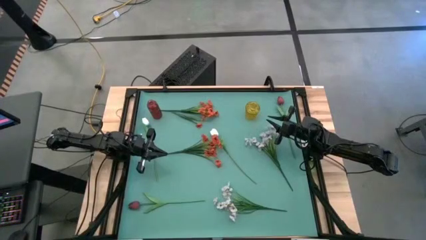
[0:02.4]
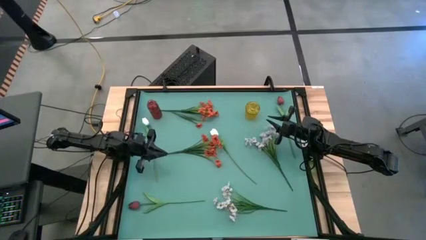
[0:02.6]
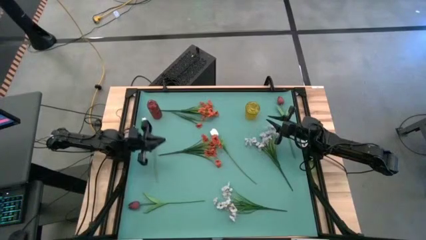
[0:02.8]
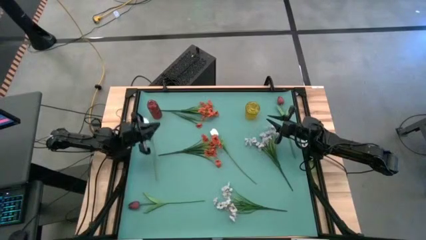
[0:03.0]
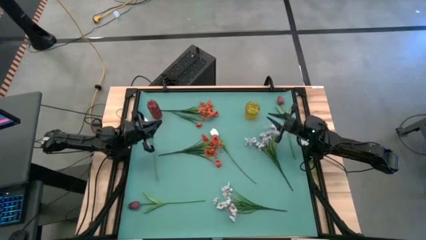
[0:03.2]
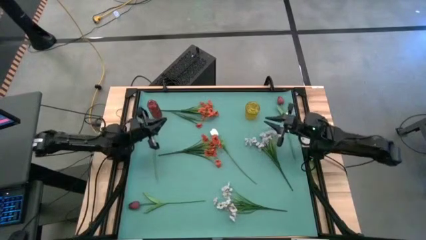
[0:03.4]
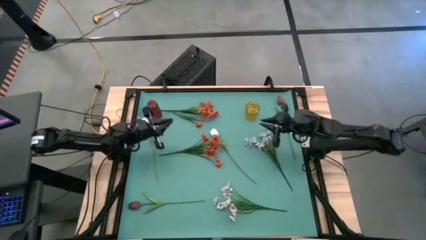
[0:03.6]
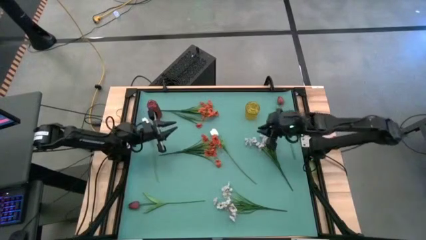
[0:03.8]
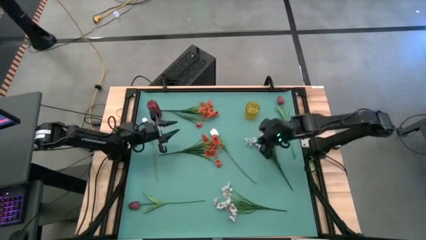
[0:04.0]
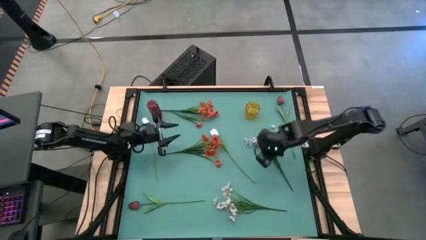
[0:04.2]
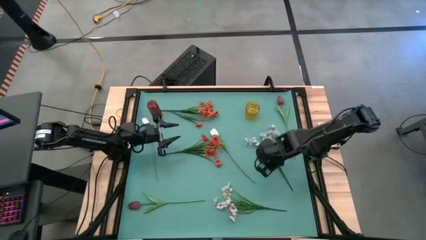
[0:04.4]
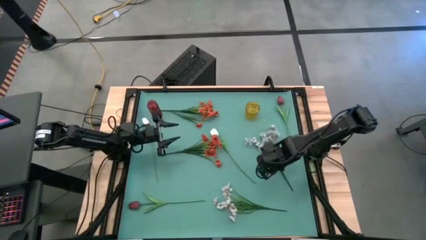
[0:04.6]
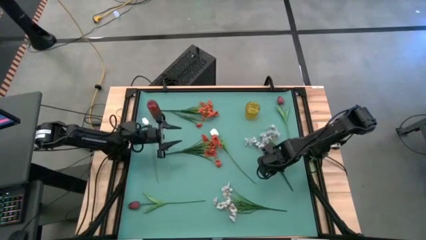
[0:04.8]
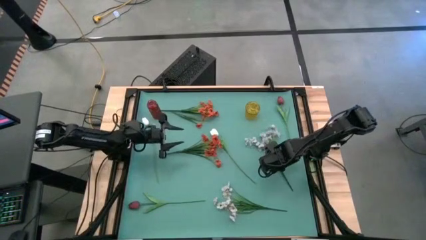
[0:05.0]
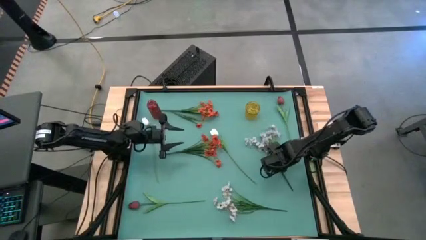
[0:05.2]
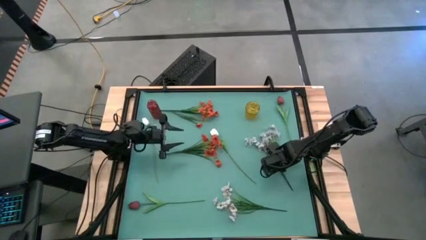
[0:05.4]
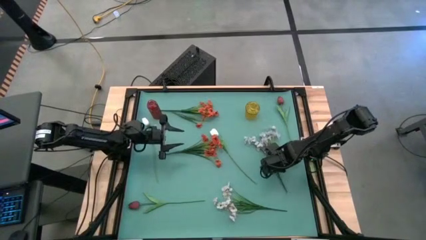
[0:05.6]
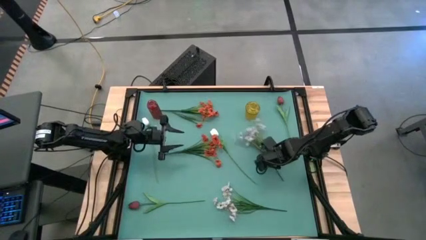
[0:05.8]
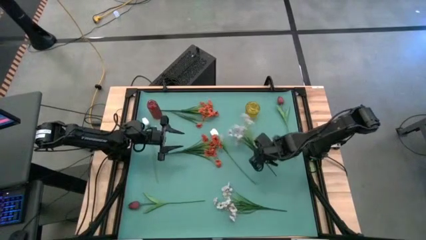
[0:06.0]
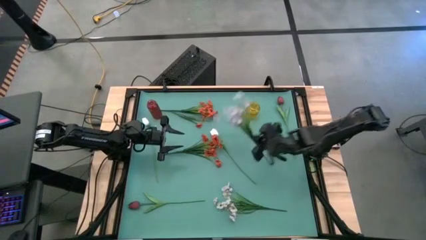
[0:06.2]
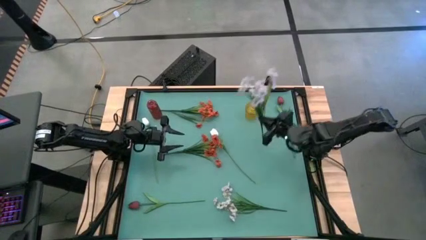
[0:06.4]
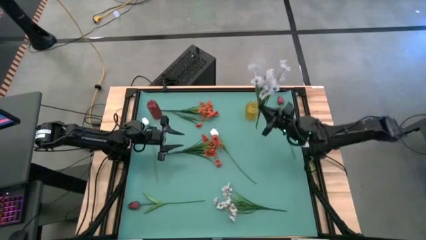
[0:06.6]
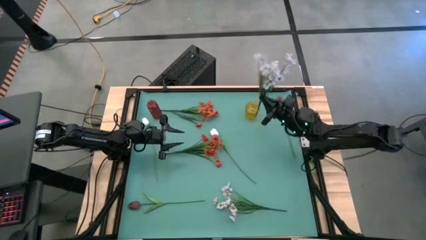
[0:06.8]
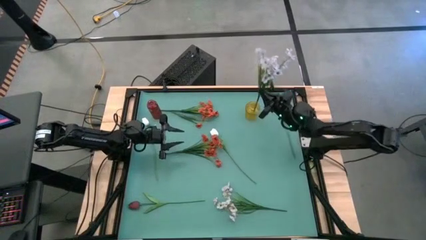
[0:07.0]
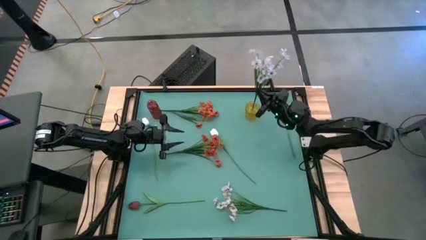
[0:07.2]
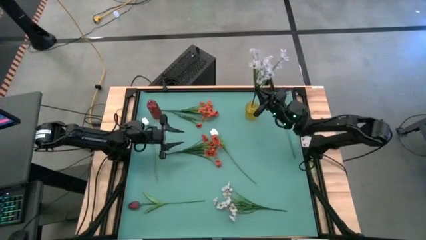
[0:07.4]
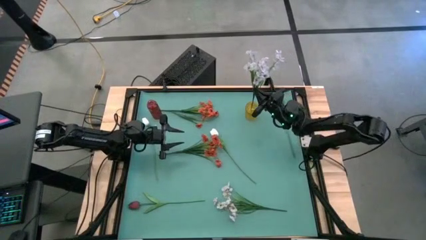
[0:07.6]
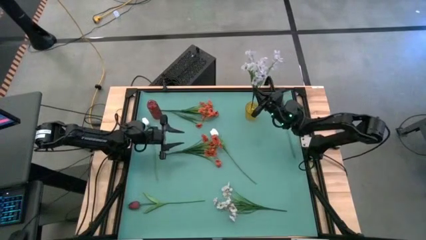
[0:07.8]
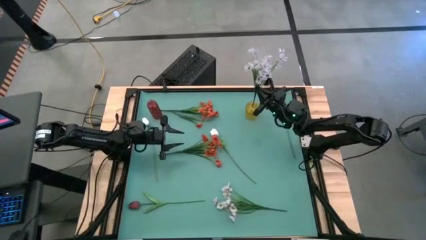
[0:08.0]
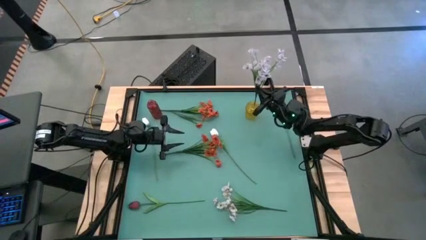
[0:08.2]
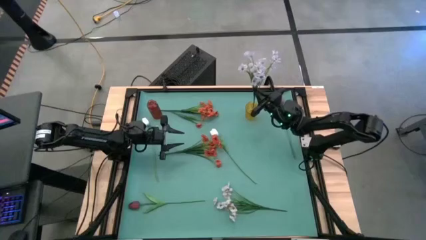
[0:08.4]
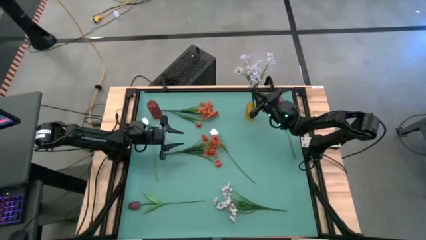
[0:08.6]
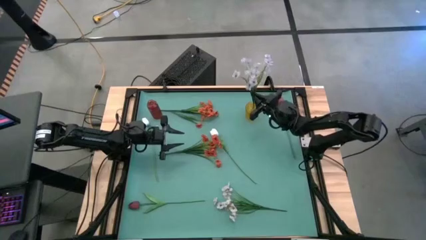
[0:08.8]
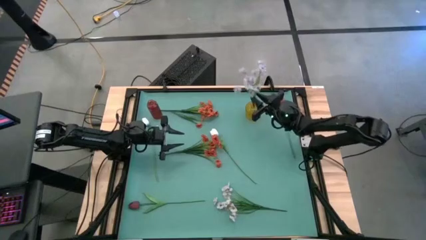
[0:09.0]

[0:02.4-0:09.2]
Task: Sort flowers into vase by color
Put the top white flowers into the yellow vase

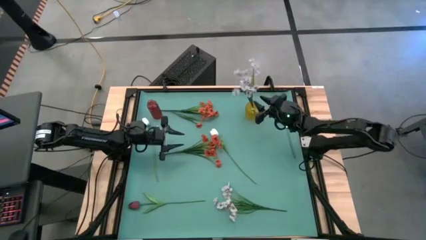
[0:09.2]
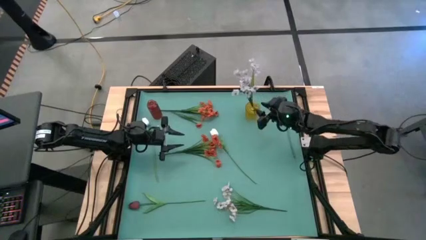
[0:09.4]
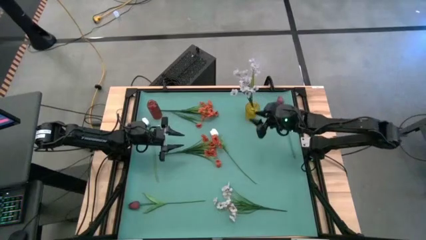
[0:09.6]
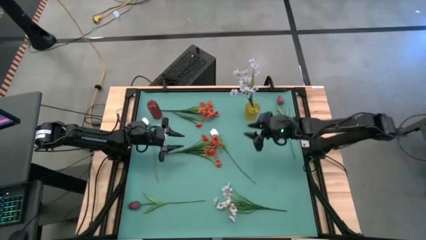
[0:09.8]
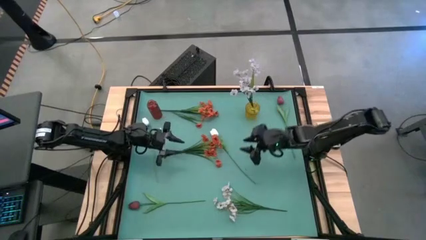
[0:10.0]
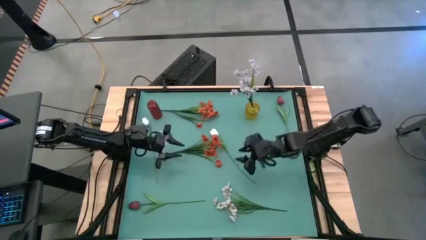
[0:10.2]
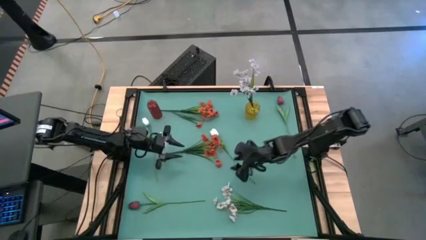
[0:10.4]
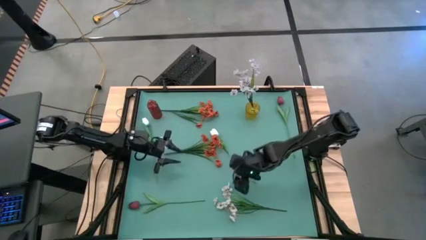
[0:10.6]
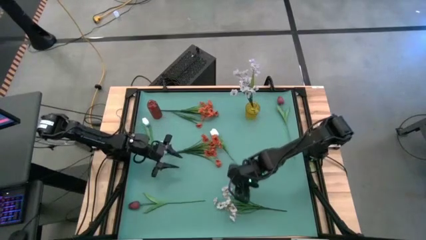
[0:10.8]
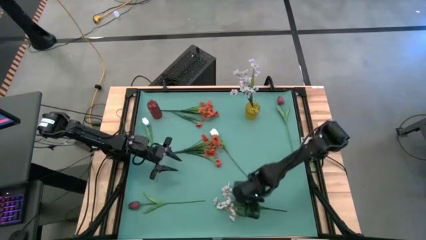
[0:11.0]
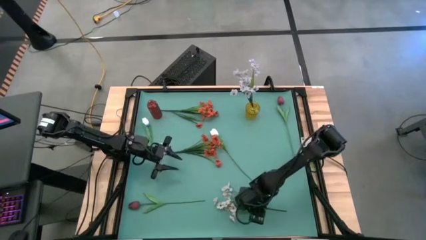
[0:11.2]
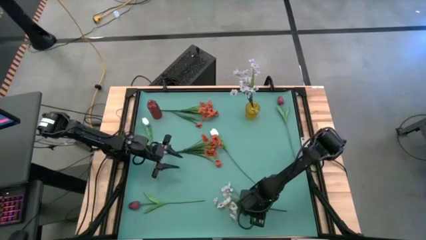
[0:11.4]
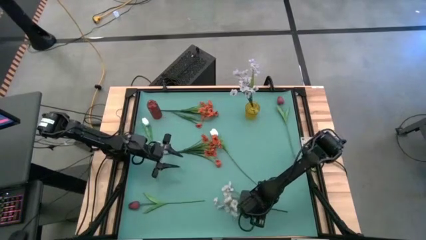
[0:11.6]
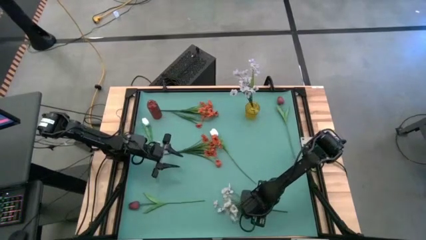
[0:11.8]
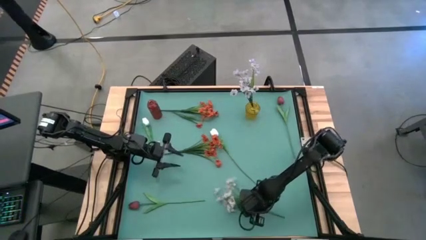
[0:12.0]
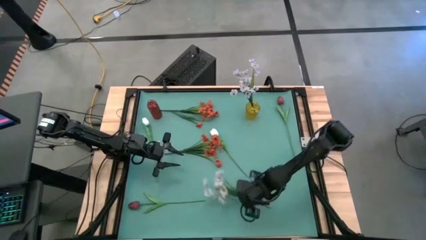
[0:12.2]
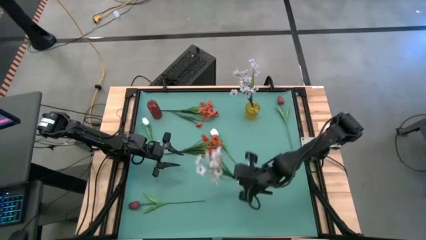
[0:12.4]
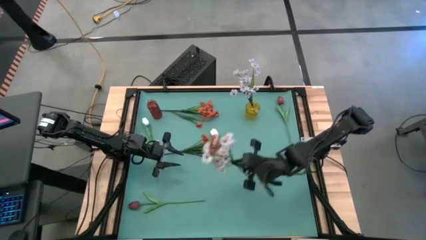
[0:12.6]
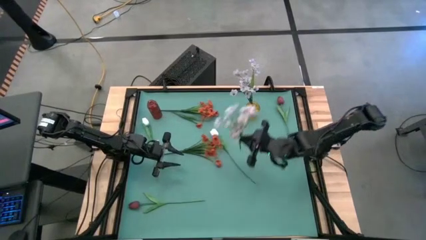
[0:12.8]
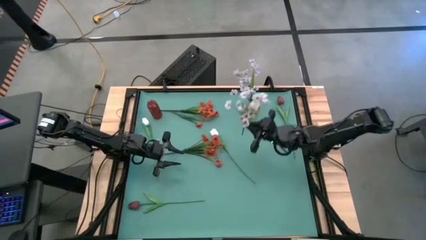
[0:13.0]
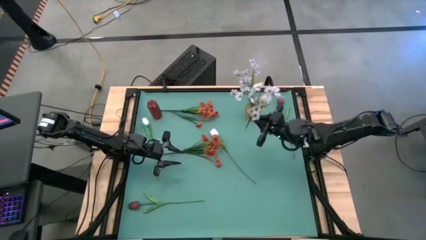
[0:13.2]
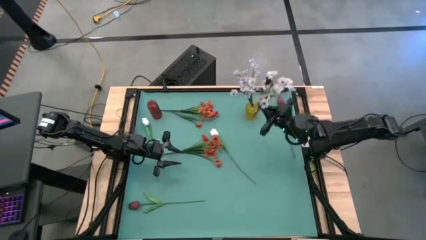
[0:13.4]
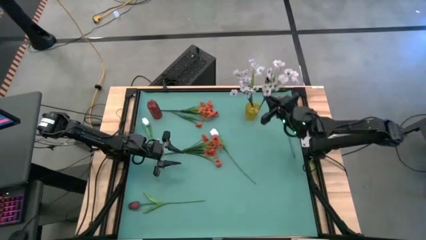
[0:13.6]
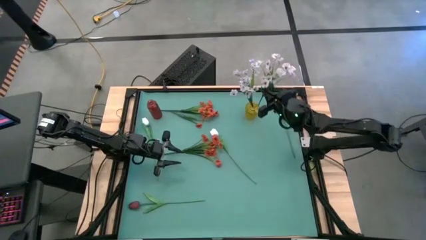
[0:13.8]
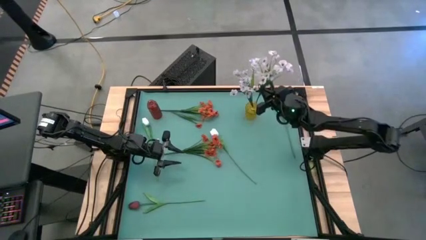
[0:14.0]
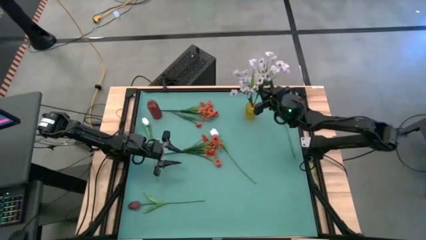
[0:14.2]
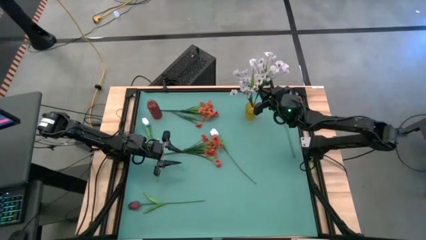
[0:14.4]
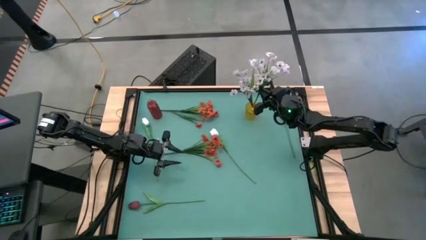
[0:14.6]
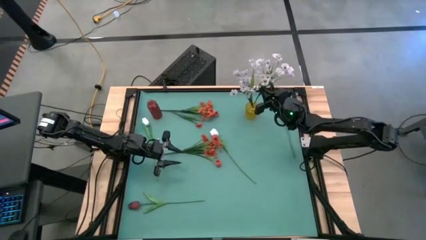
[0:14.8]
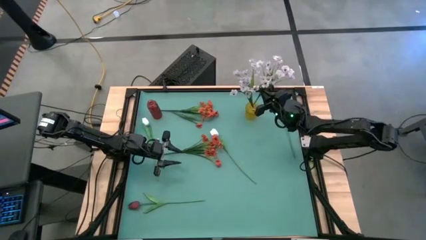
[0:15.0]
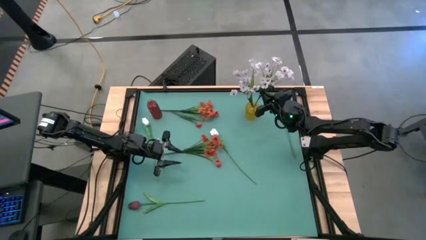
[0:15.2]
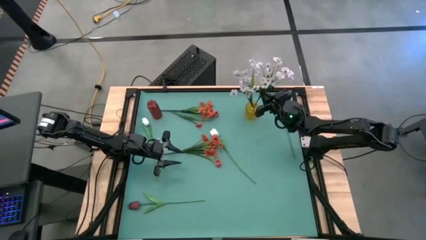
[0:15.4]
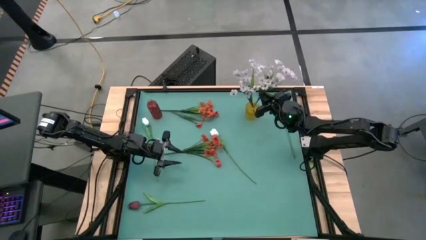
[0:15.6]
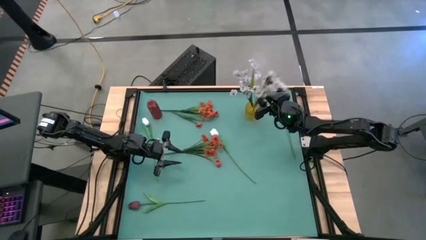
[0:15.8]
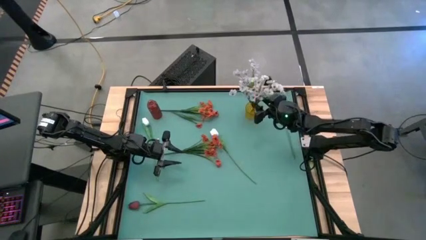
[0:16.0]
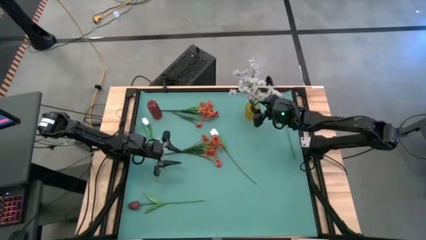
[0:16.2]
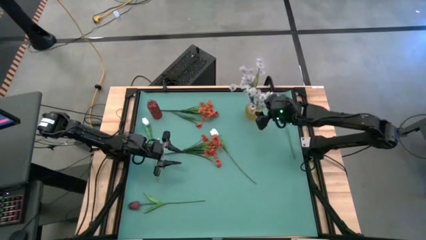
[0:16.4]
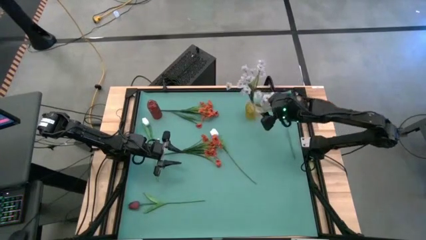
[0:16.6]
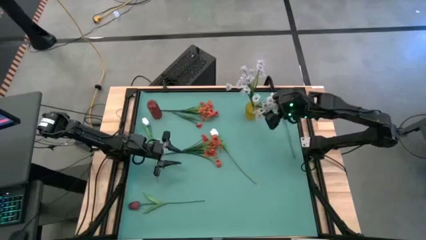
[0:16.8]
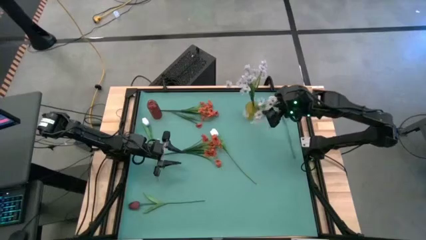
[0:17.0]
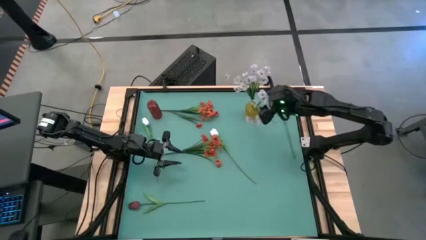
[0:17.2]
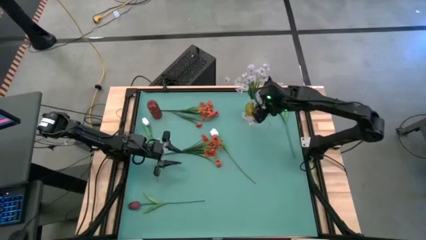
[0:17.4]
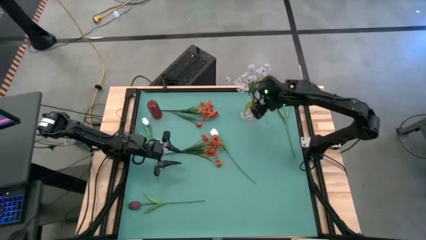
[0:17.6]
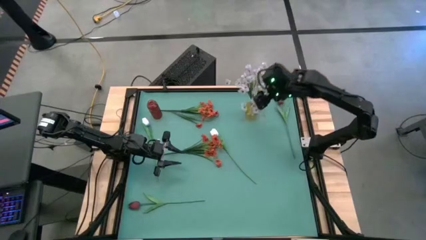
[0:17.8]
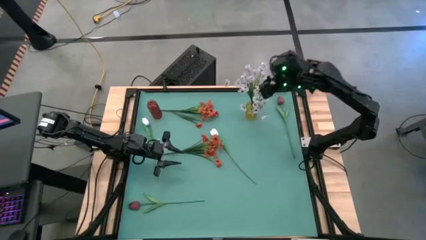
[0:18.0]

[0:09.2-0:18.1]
Put the white flowers into the yellow vase
